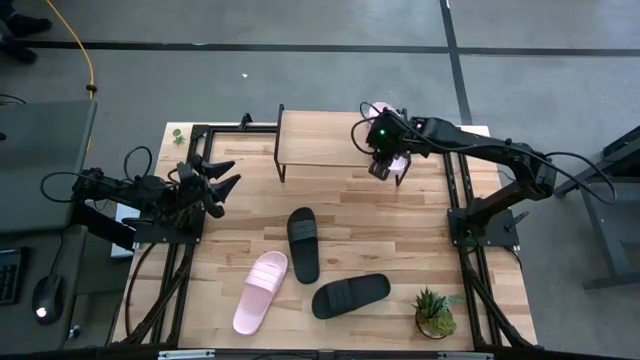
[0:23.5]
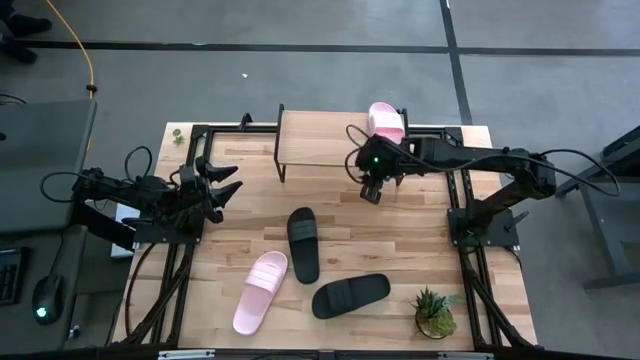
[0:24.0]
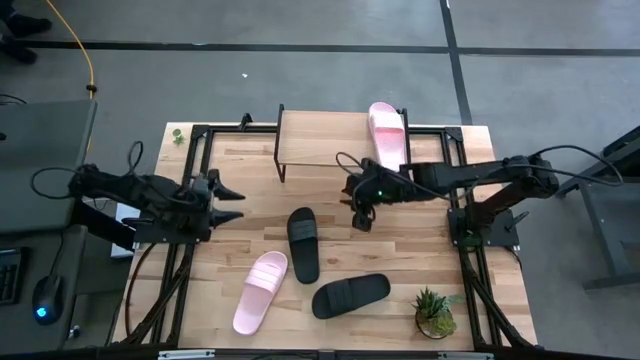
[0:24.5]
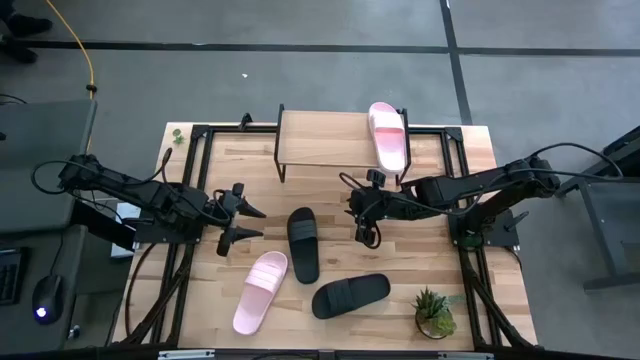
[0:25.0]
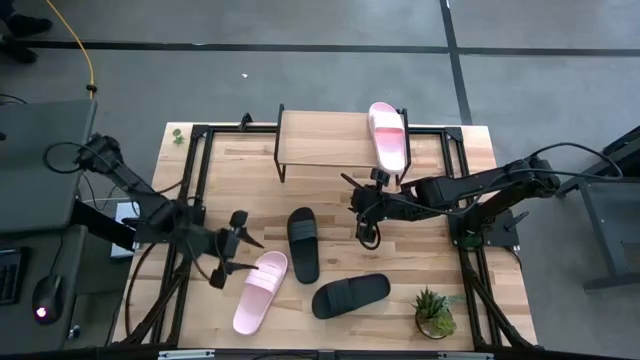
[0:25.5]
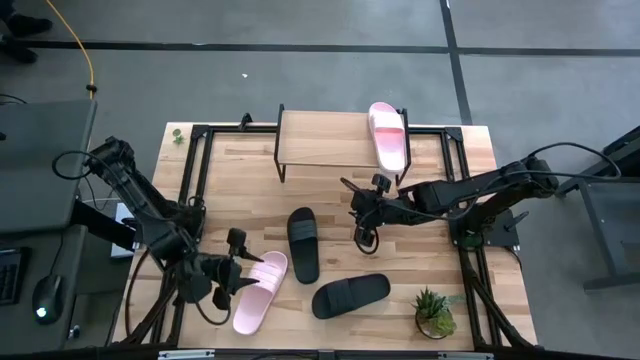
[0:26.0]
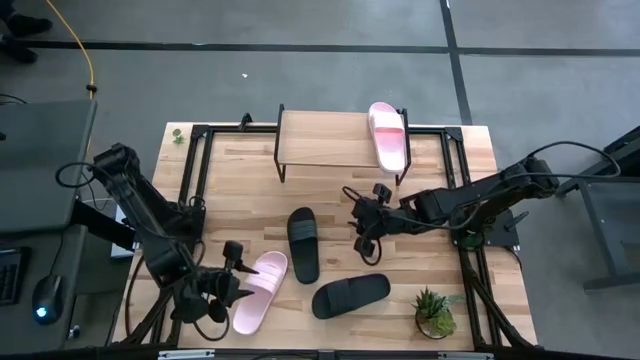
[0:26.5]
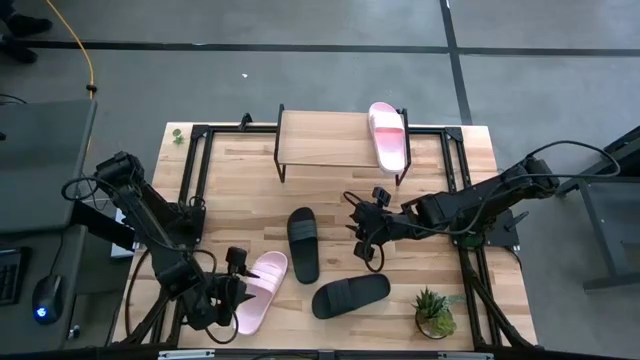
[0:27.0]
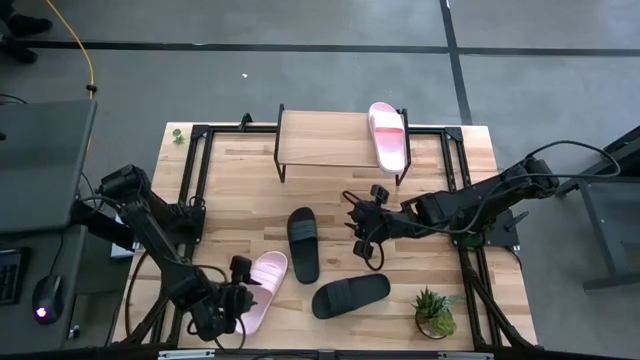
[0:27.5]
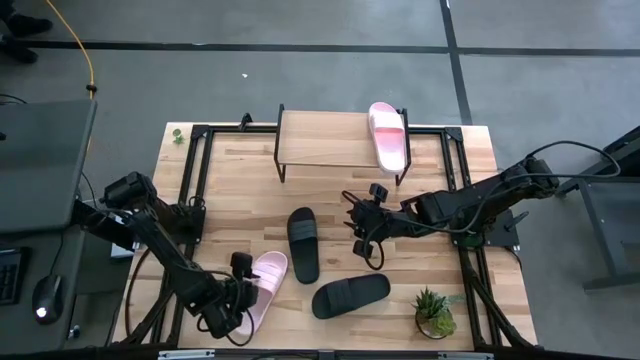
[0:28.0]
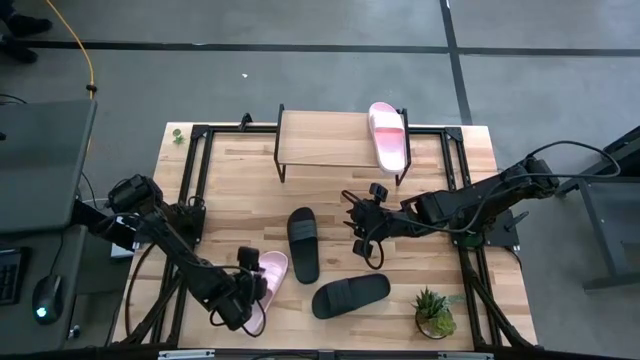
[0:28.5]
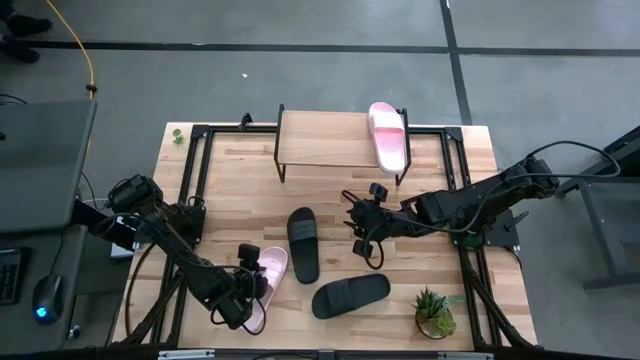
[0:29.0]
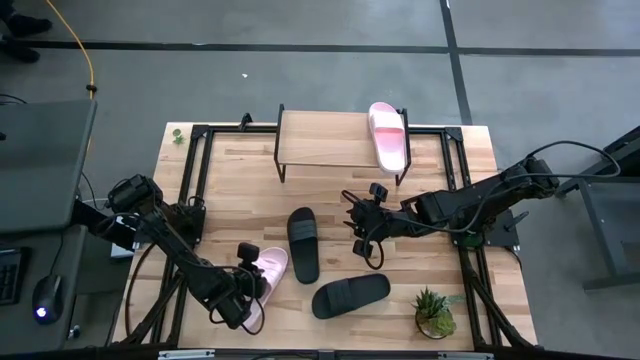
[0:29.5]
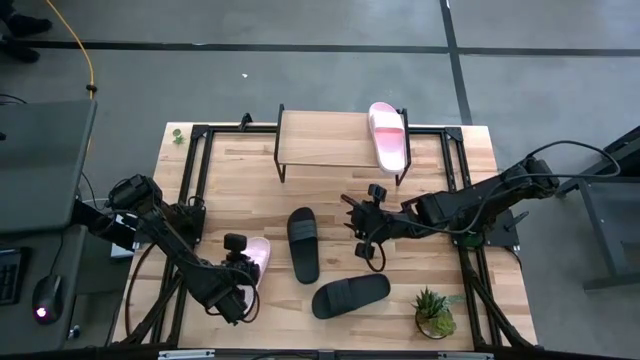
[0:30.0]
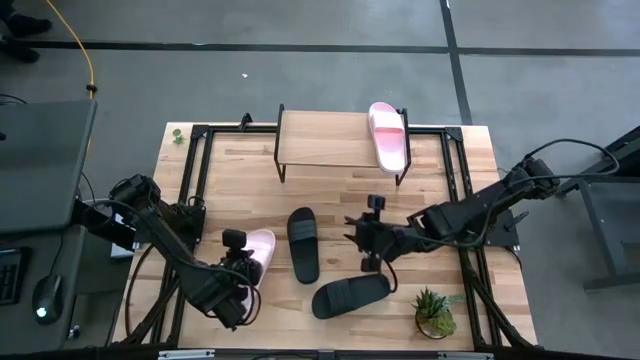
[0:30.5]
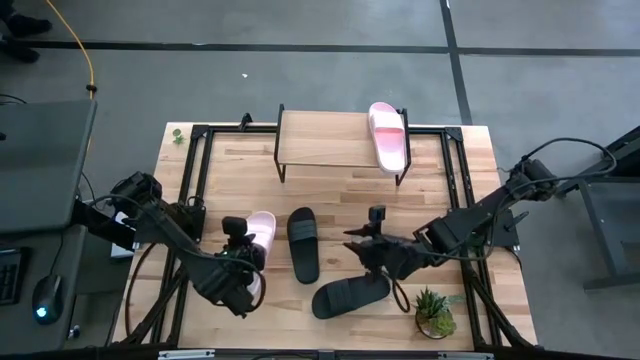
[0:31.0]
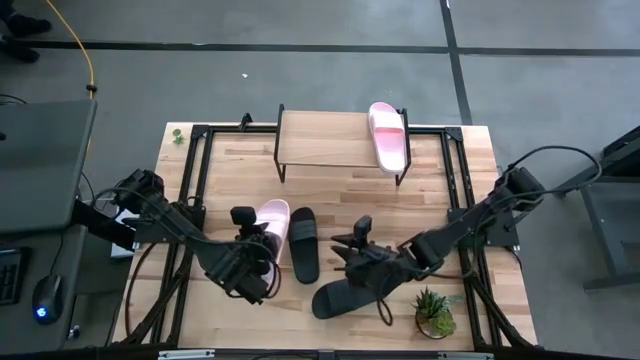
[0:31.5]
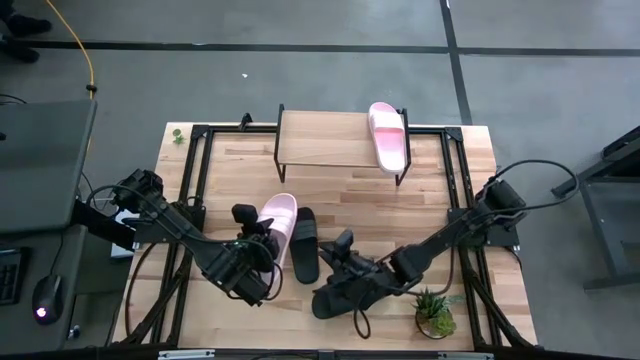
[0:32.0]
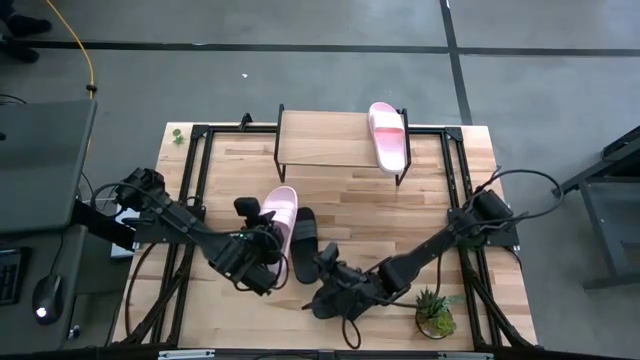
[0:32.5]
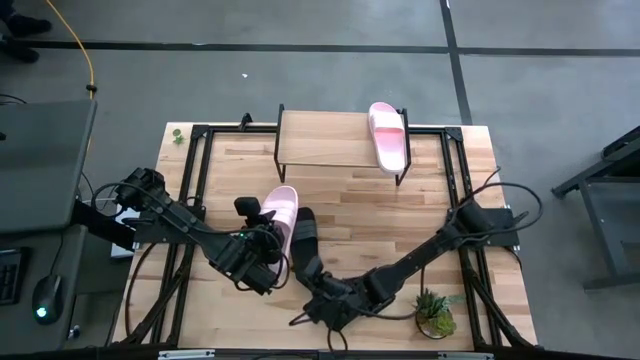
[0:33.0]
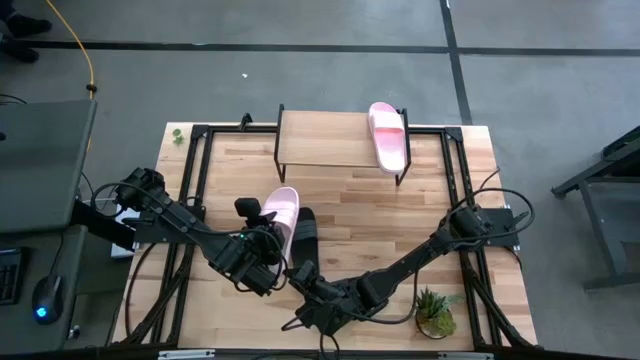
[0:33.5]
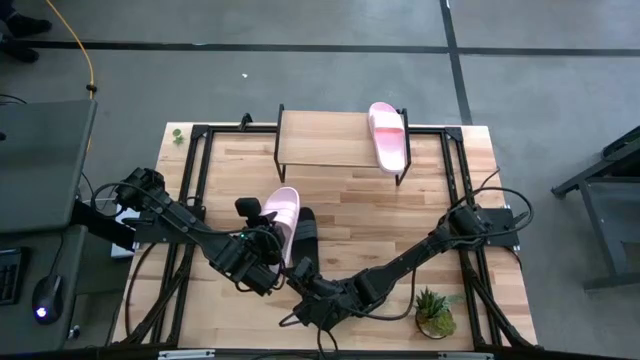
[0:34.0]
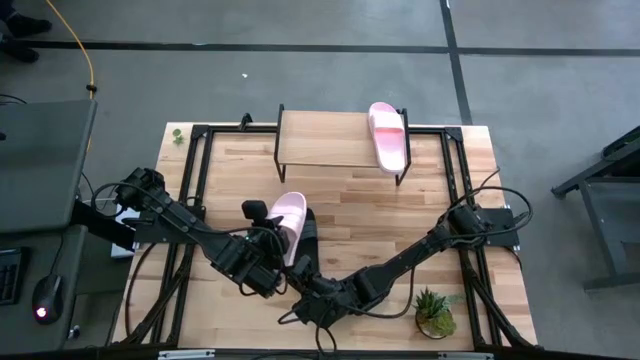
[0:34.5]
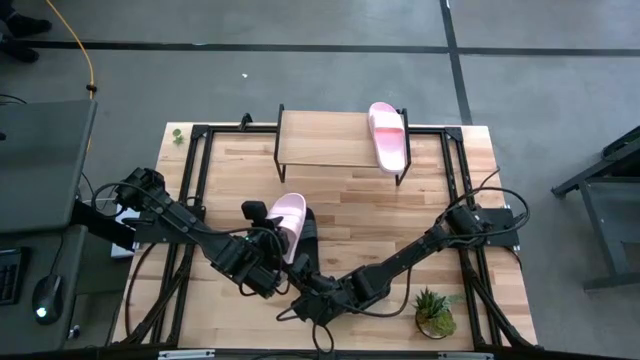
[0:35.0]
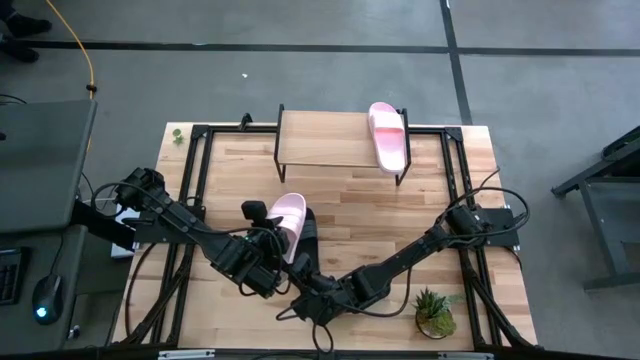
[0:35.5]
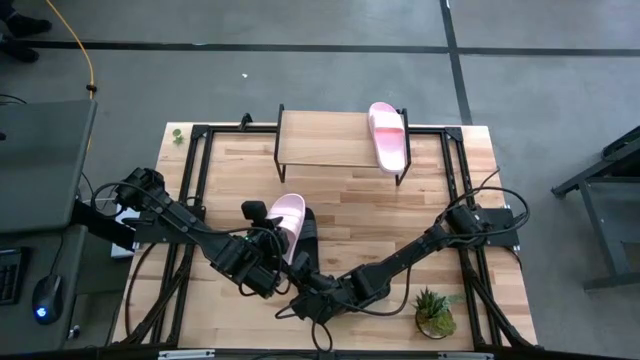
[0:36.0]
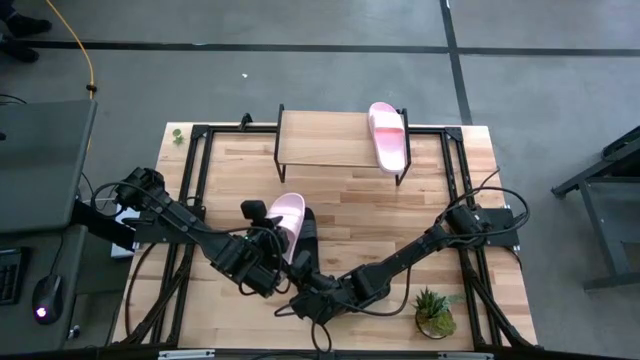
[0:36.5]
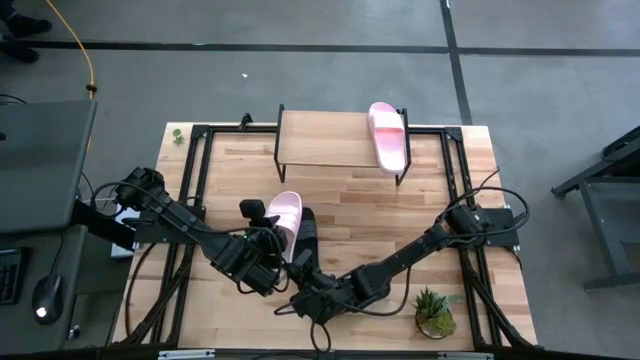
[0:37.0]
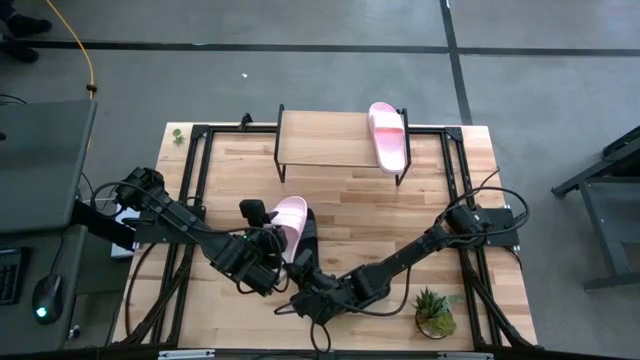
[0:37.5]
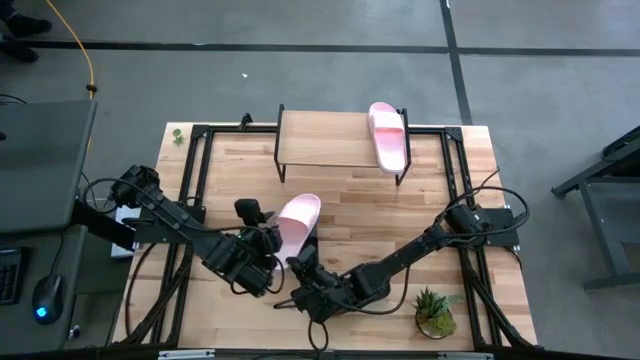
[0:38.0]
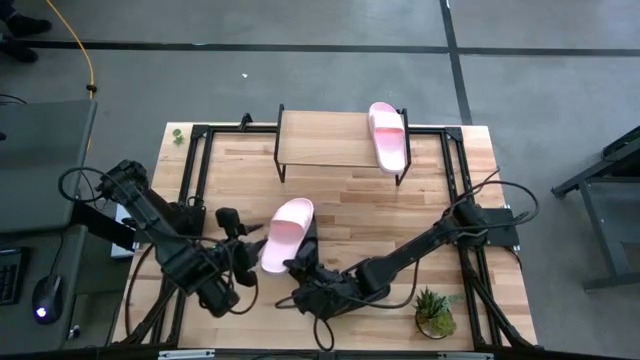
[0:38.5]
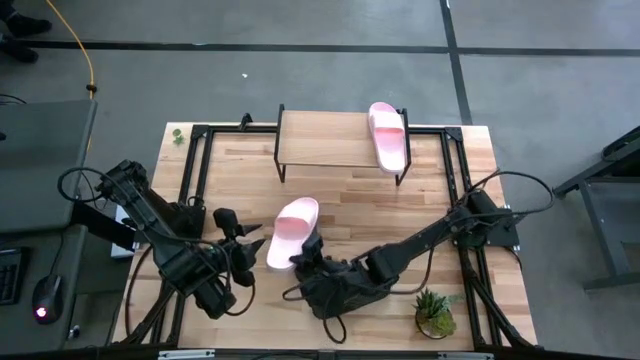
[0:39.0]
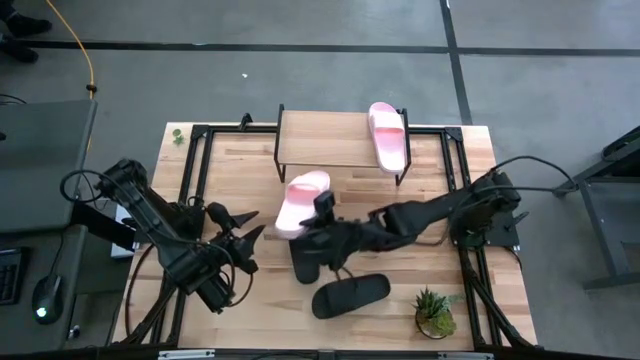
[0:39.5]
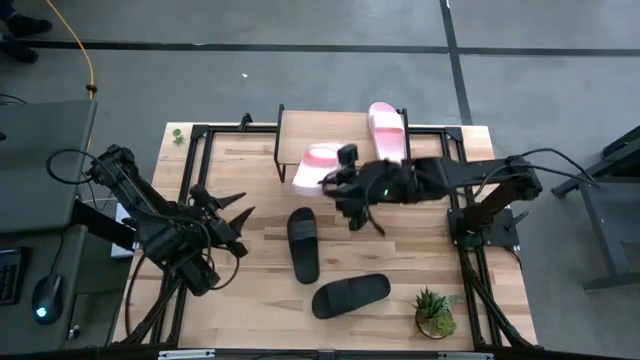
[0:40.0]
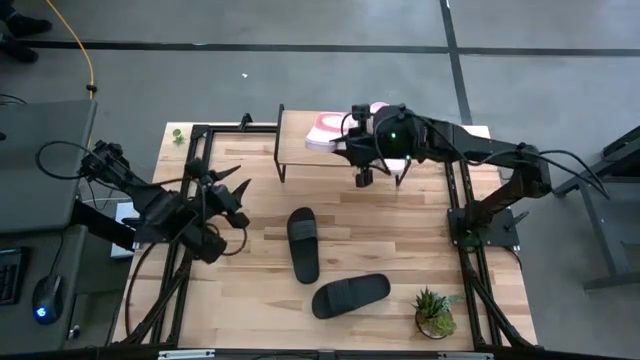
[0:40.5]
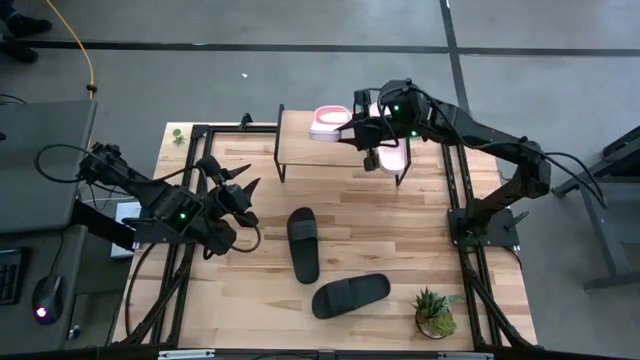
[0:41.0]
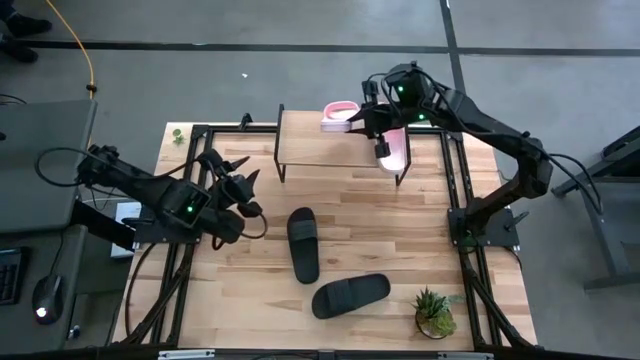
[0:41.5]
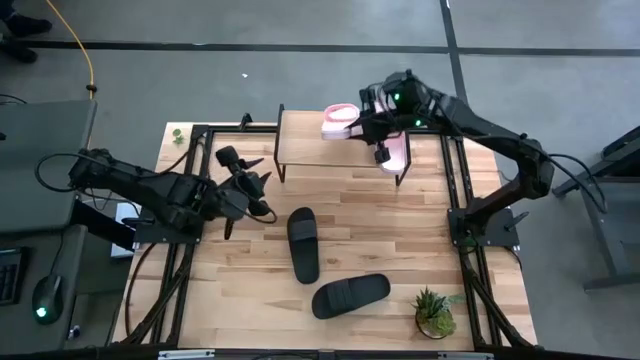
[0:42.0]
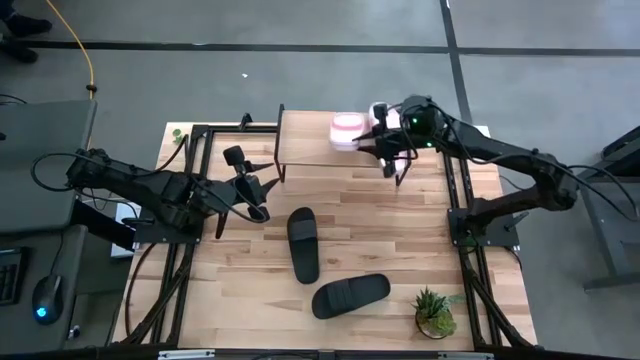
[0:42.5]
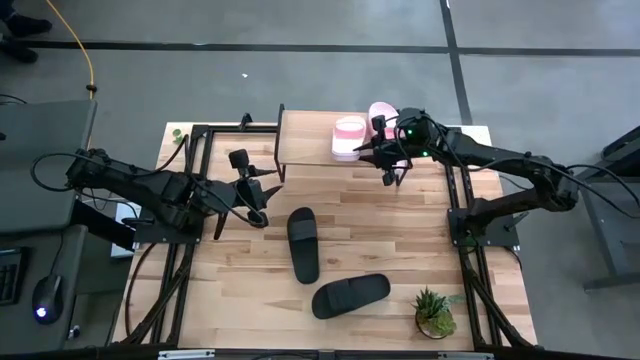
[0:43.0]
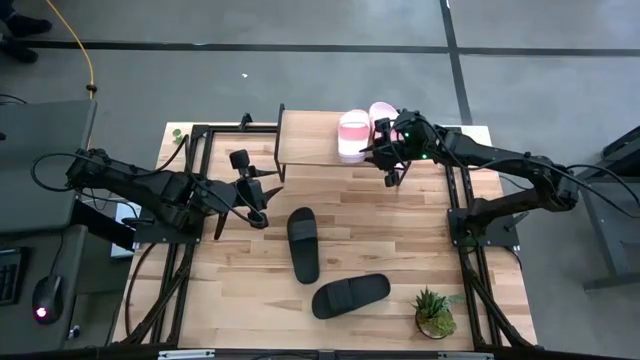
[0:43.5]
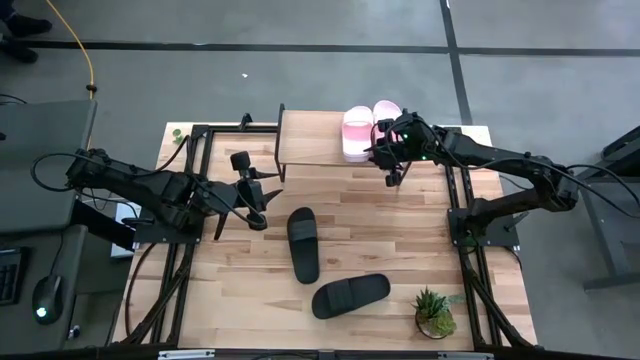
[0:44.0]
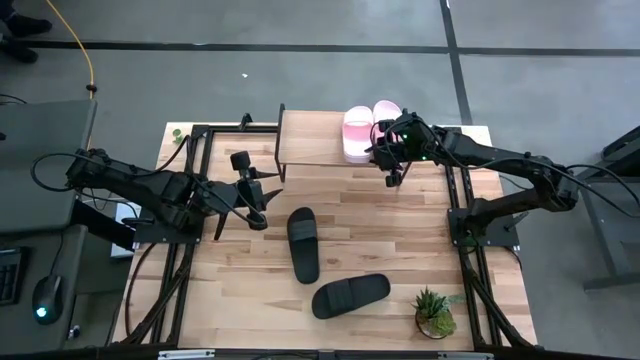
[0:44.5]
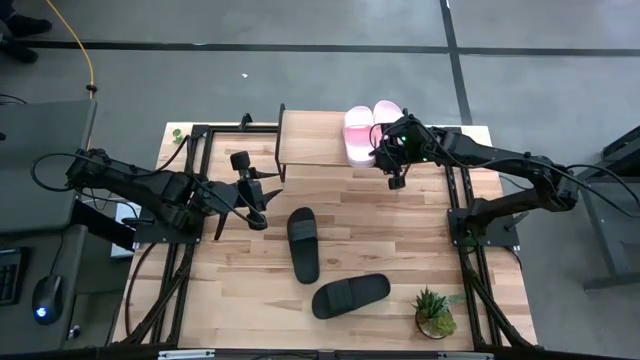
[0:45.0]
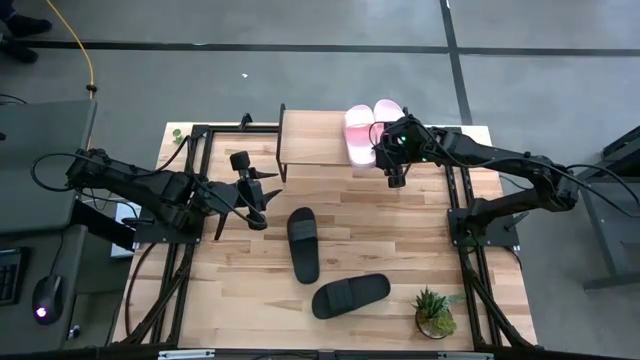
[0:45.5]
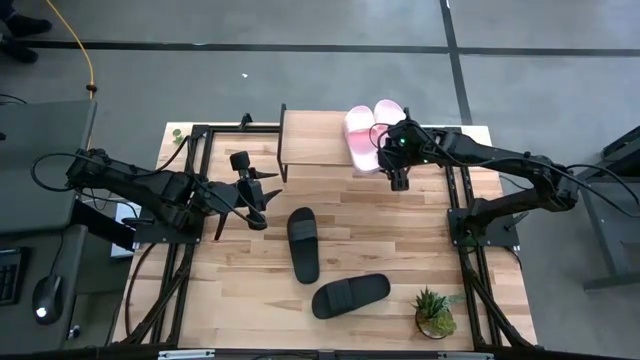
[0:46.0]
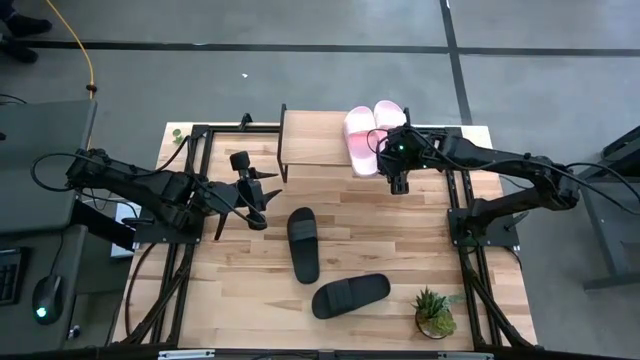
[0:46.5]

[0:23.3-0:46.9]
Task: Pick and place slides into the shelf
Put the pink slides on the shelf
